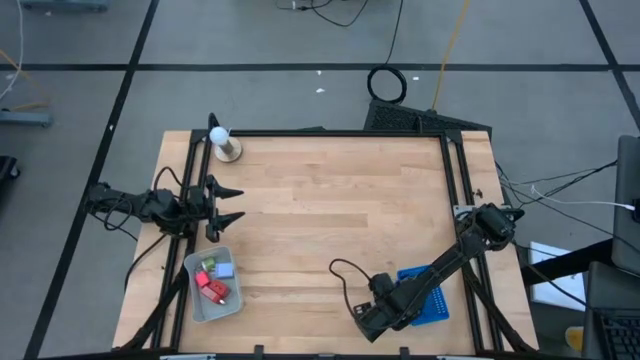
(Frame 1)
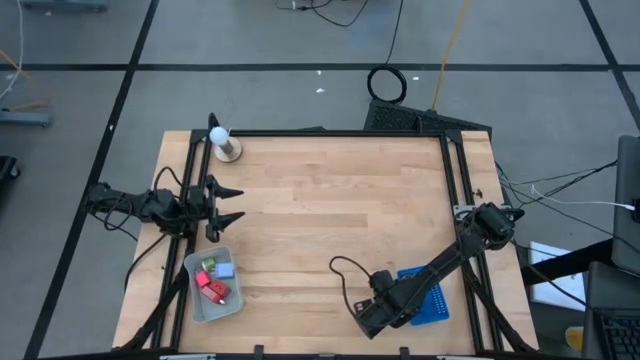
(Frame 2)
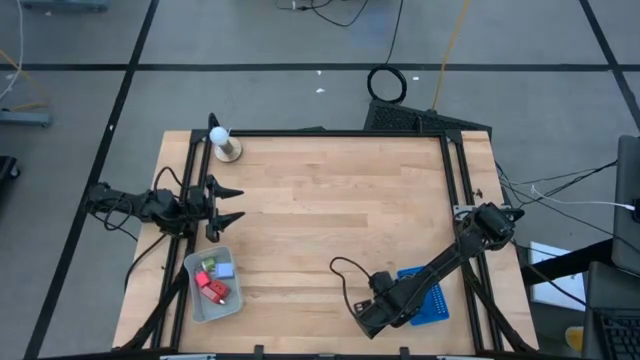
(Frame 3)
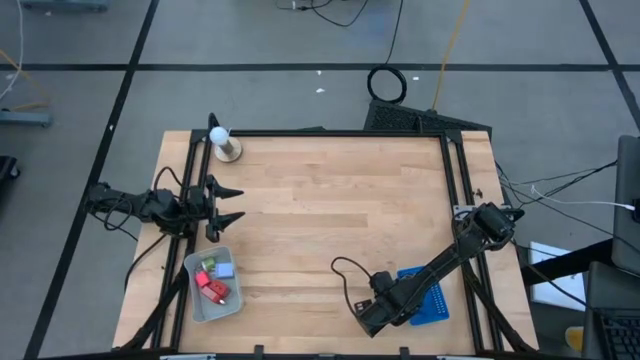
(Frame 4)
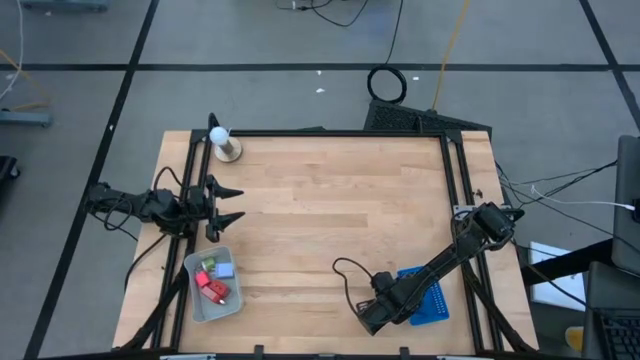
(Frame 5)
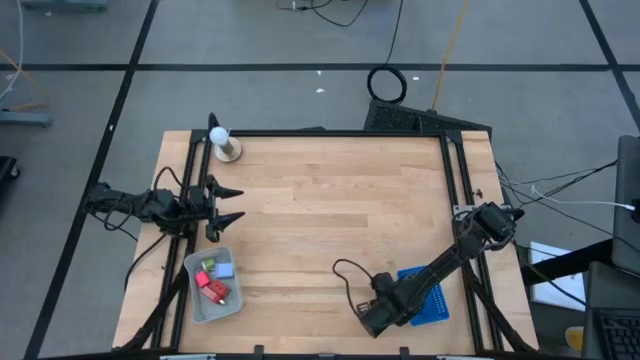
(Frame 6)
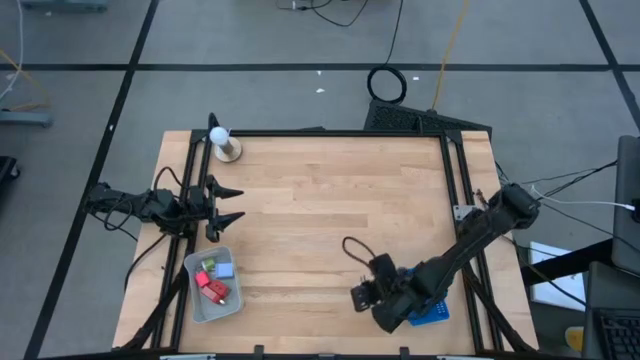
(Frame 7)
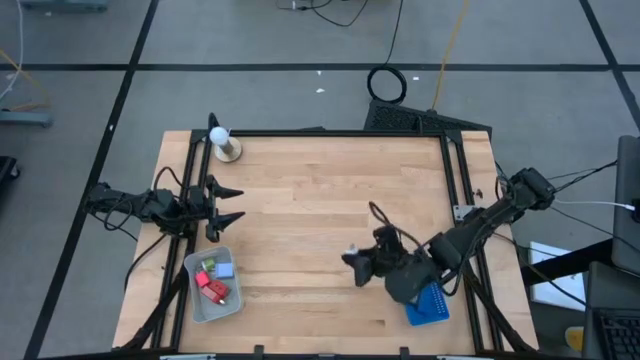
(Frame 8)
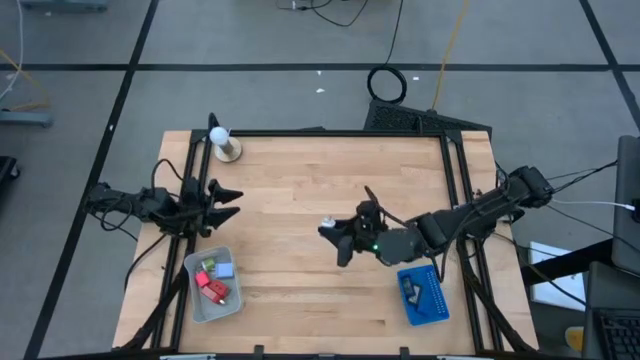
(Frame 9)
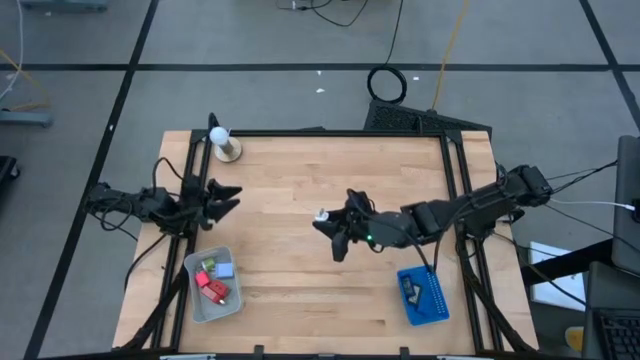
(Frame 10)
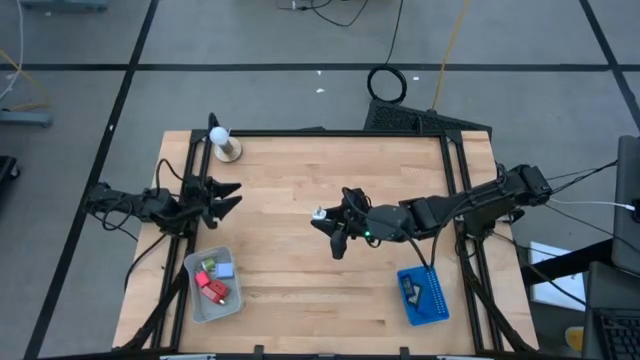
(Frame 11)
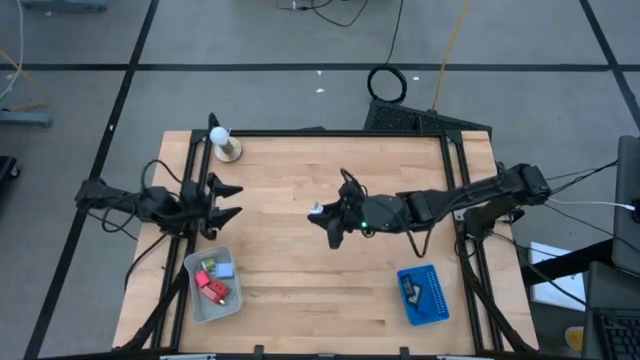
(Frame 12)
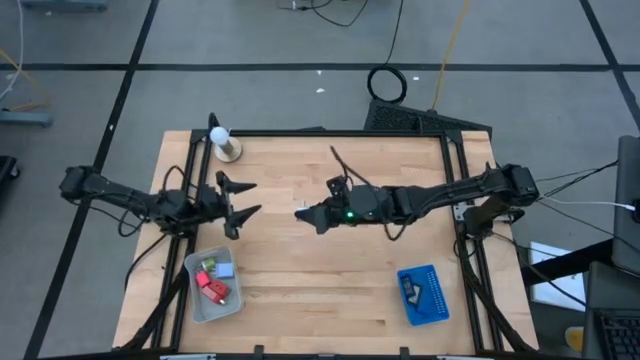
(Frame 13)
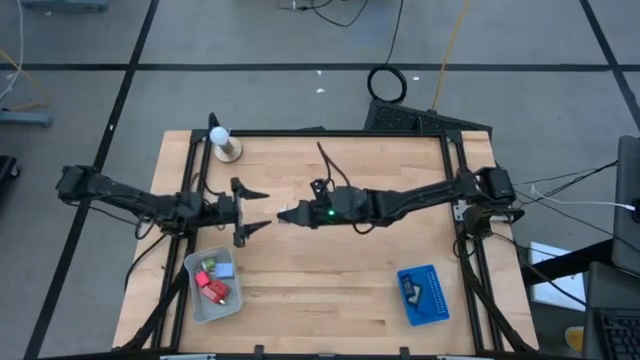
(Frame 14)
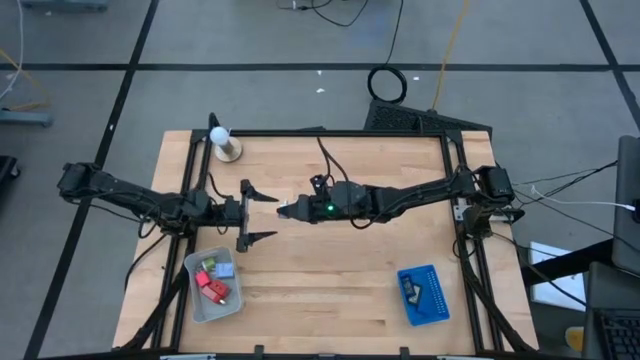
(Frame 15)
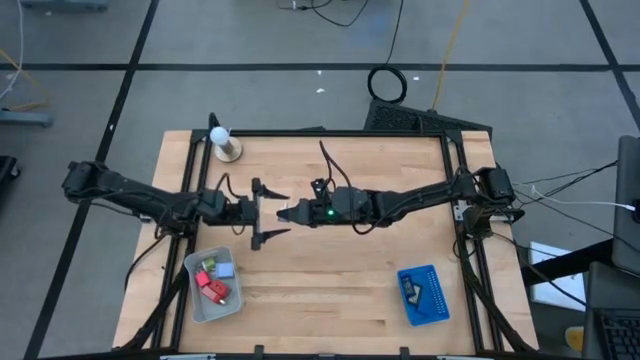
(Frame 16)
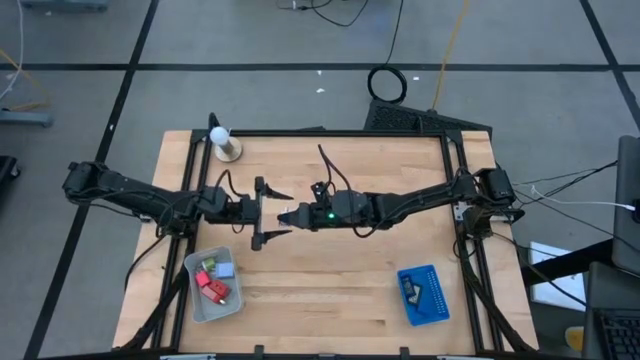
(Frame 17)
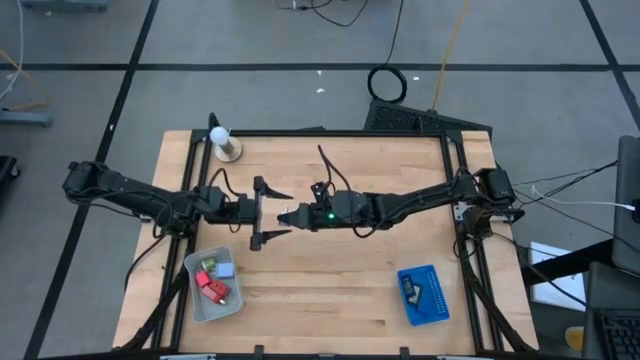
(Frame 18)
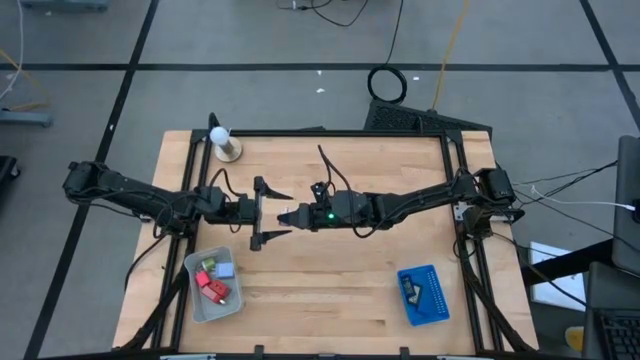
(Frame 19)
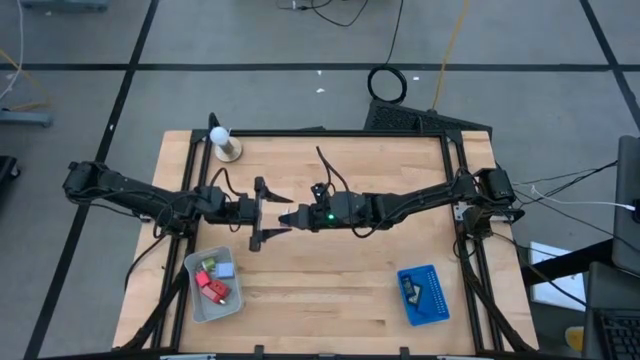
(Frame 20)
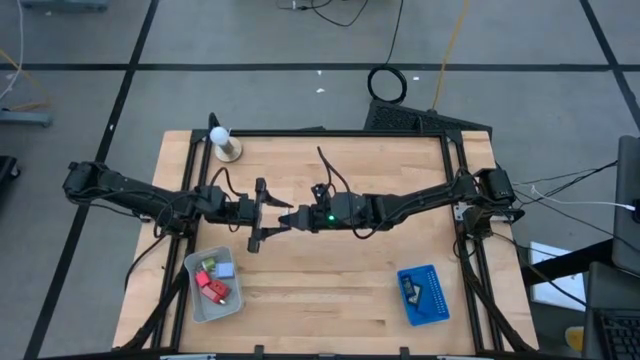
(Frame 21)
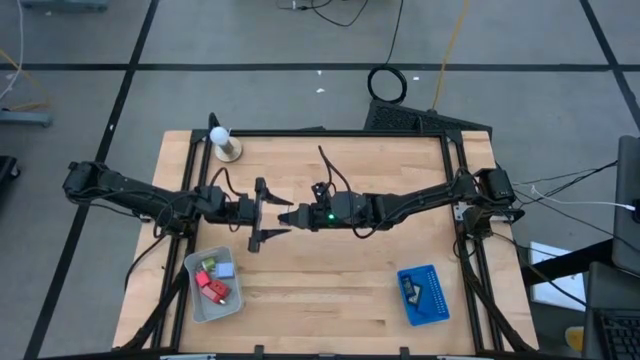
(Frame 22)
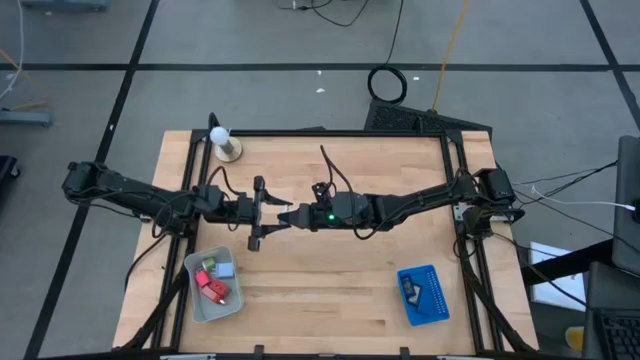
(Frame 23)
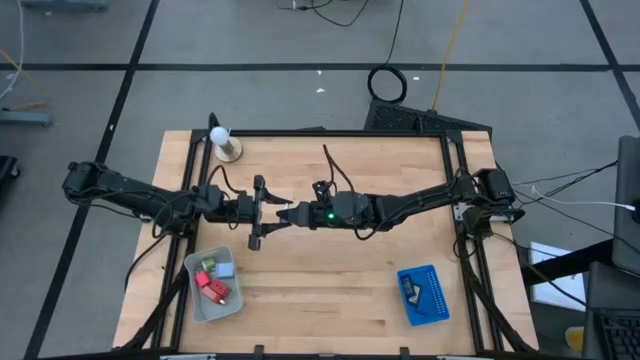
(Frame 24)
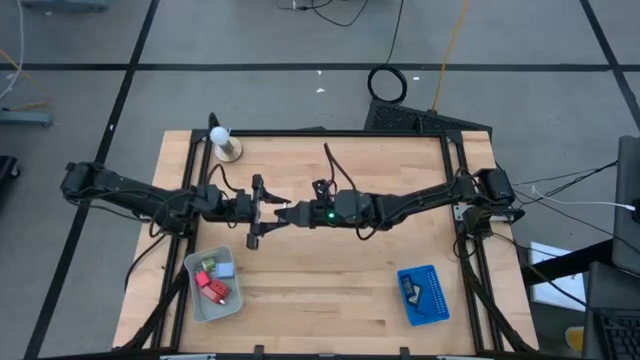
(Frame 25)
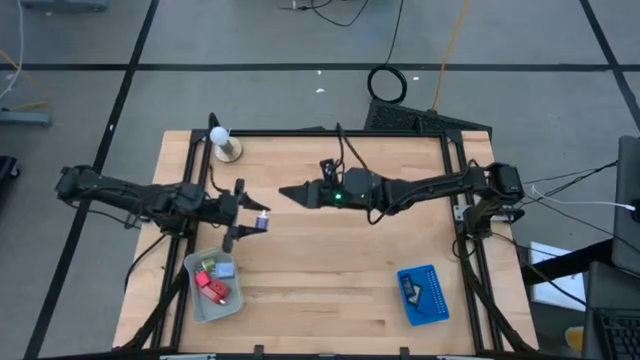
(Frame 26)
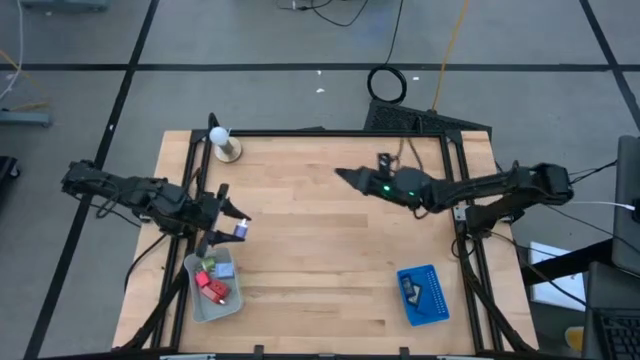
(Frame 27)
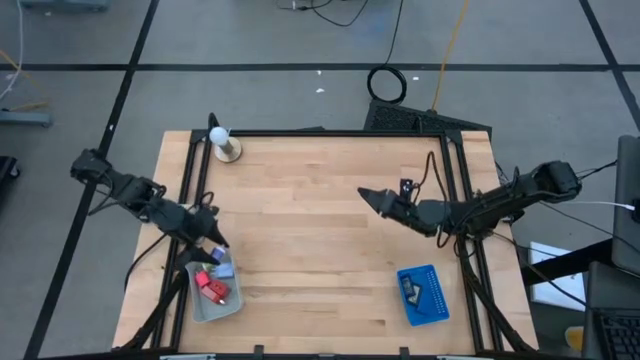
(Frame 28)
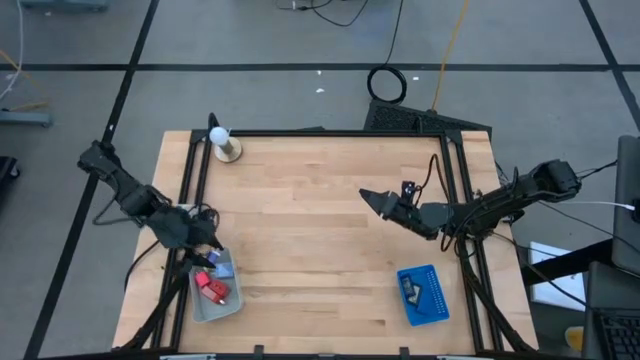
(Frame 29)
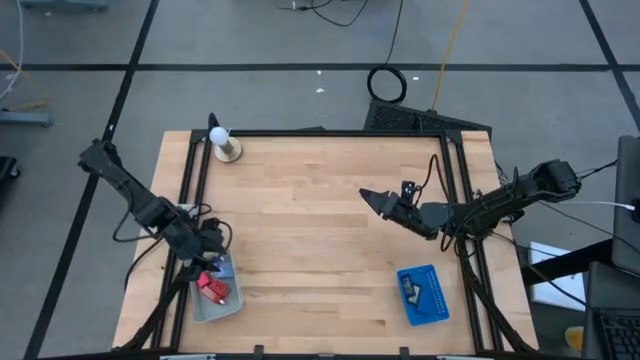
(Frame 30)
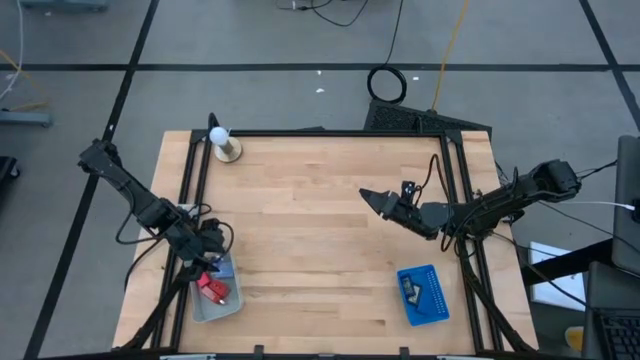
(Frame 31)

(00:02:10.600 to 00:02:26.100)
Task: Pick & Place Office items
Put the violet power adapter into the gray bin

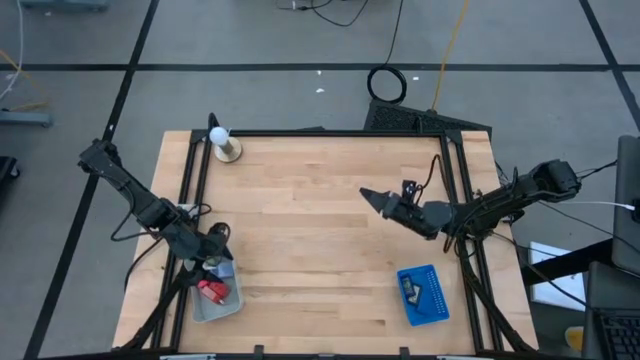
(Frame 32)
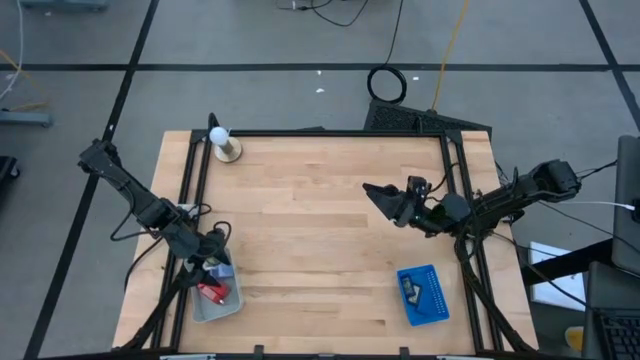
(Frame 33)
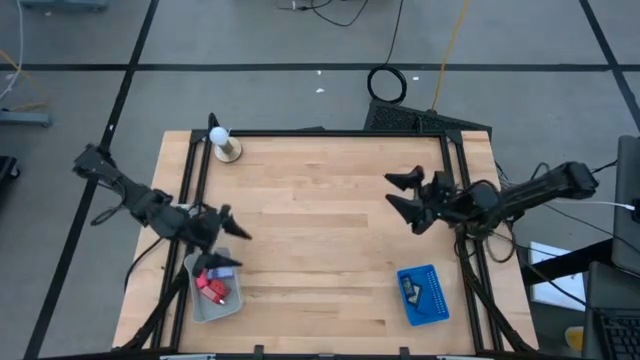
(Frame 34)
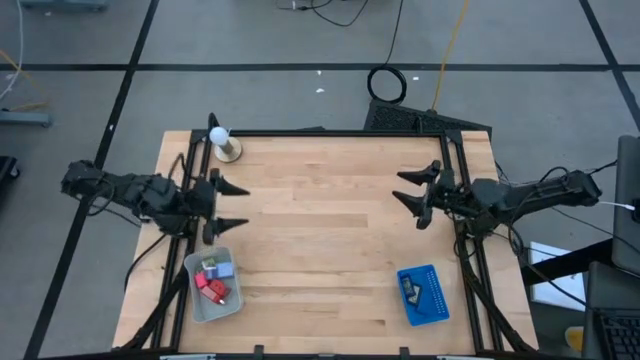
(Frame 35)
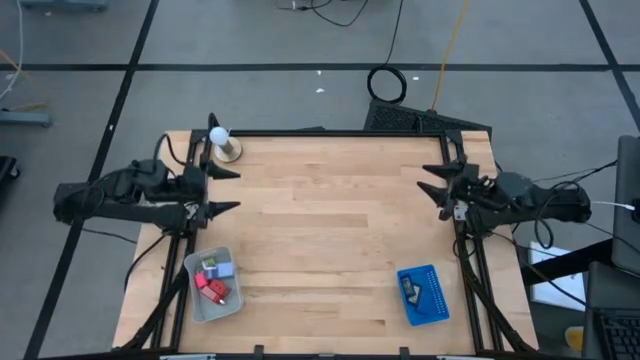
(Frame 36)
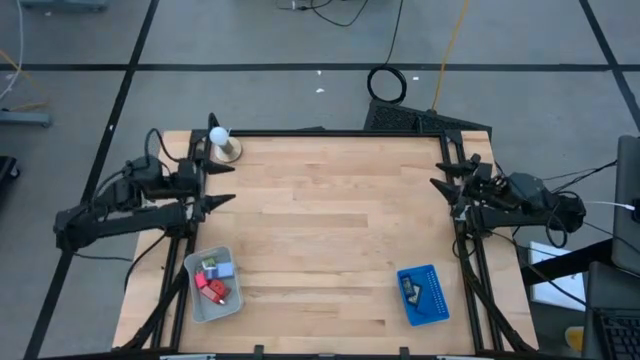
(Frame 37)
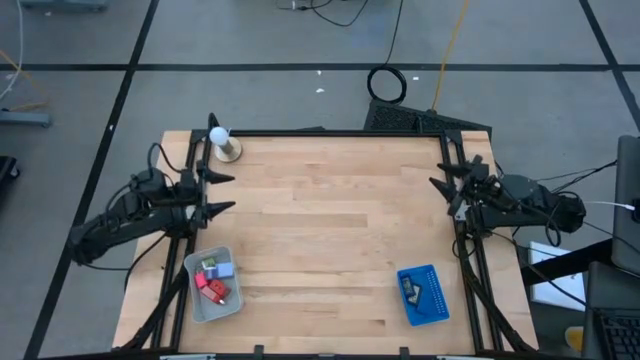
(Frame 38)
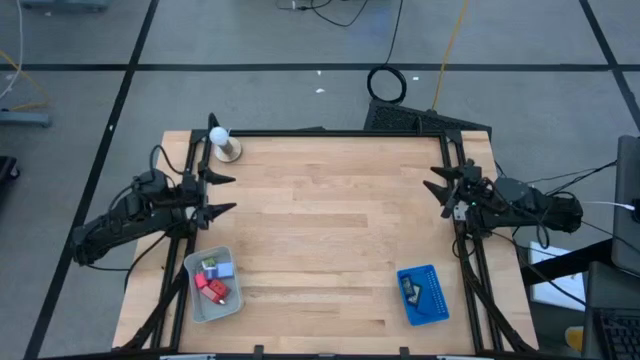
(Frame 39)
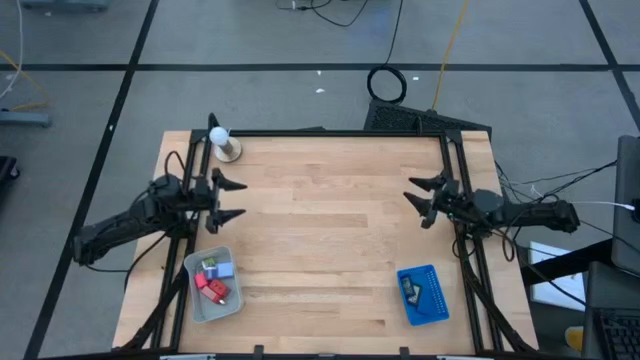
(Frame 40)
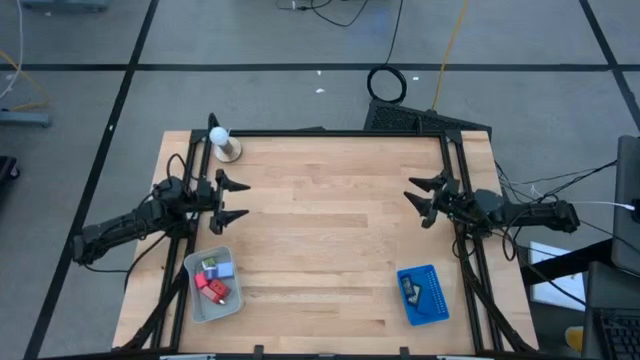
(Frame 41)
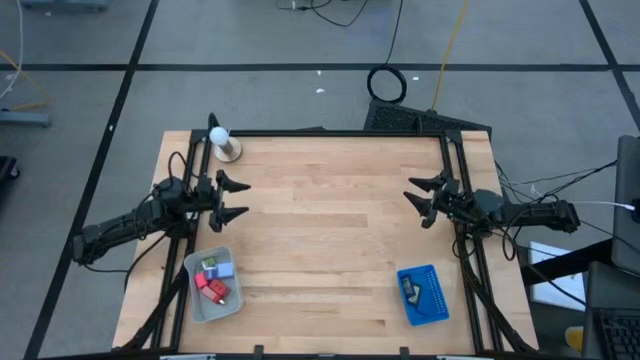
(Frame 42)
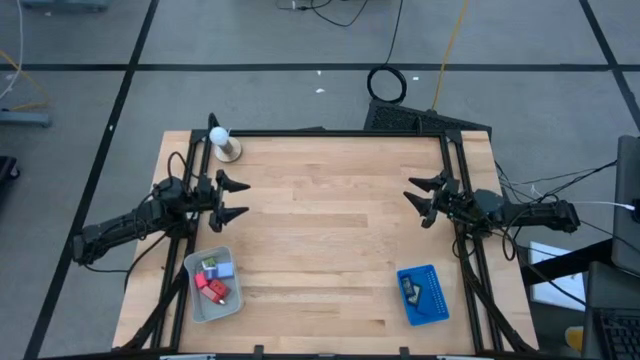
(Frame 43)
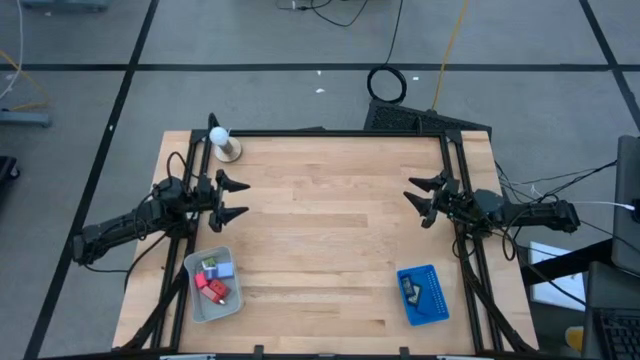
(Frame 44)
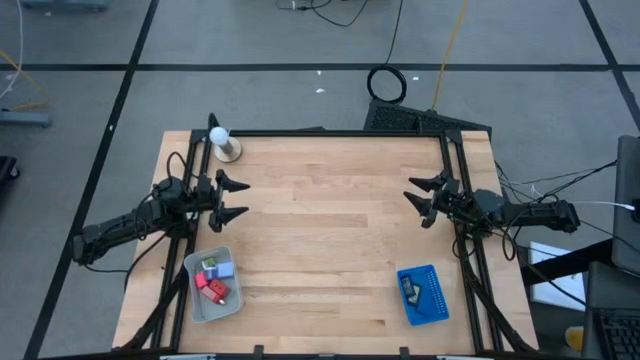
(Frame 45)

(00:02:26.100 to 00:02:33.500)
Return to Home Position
